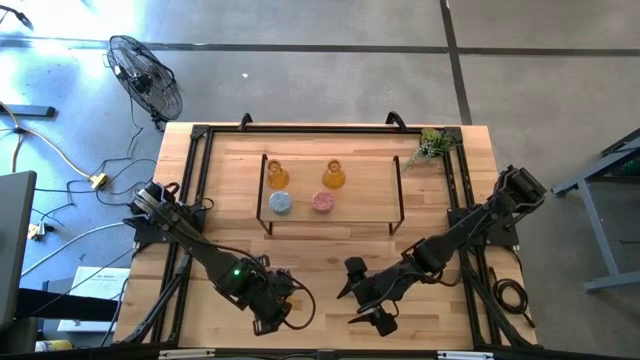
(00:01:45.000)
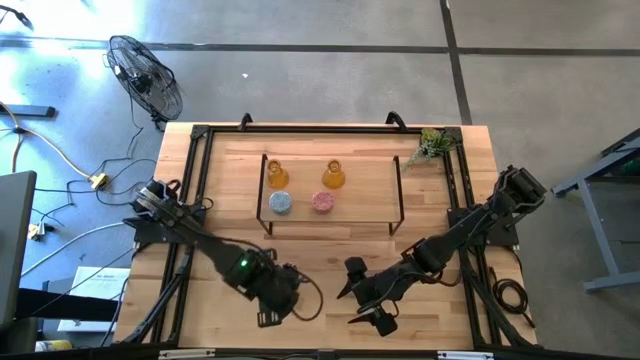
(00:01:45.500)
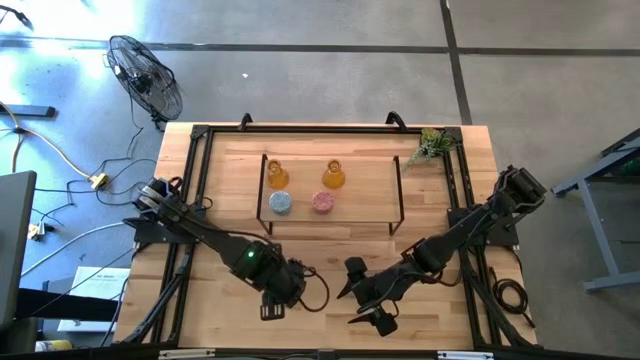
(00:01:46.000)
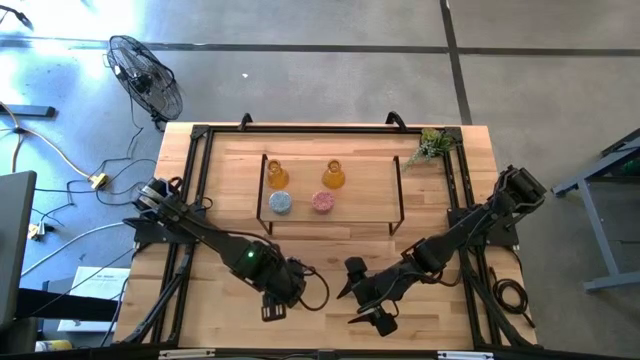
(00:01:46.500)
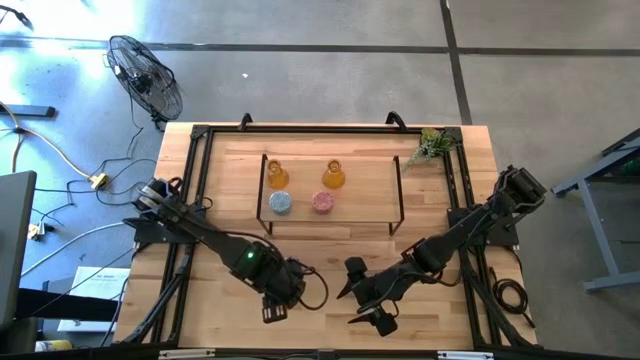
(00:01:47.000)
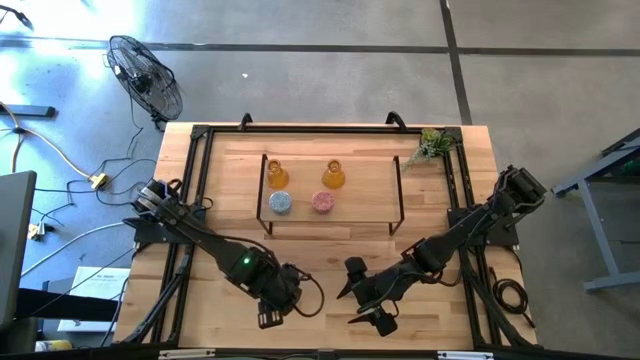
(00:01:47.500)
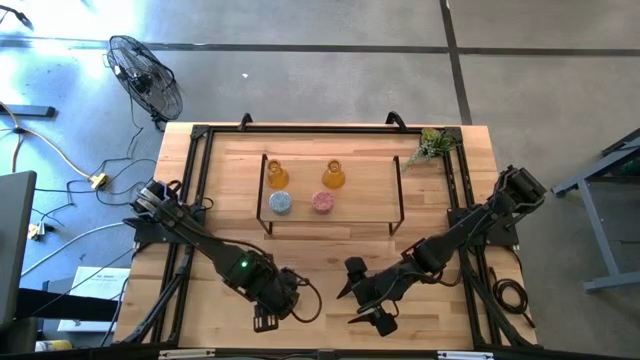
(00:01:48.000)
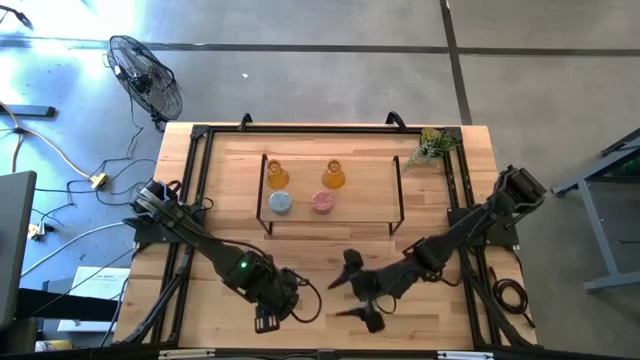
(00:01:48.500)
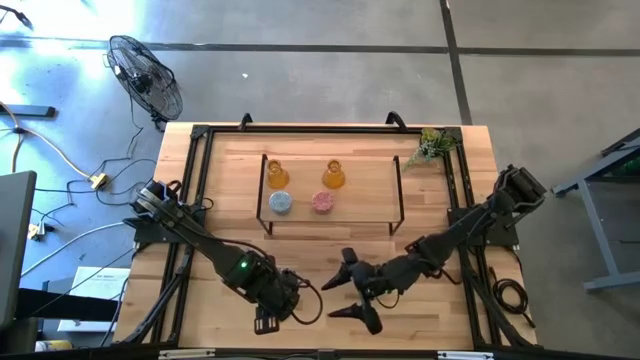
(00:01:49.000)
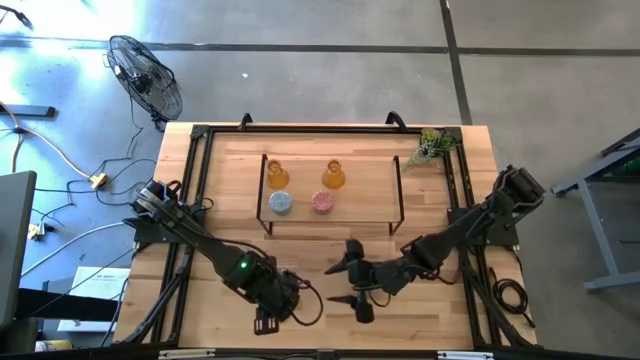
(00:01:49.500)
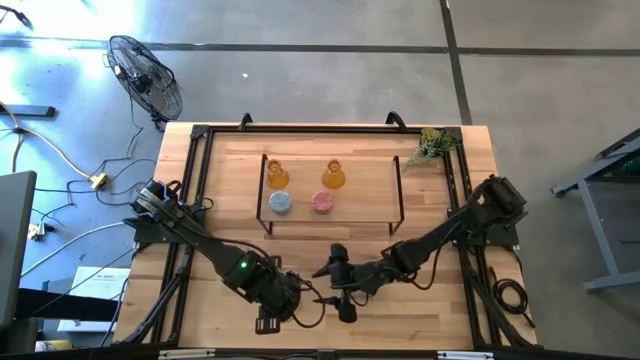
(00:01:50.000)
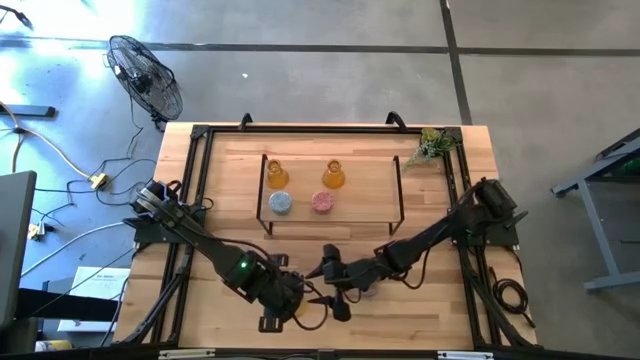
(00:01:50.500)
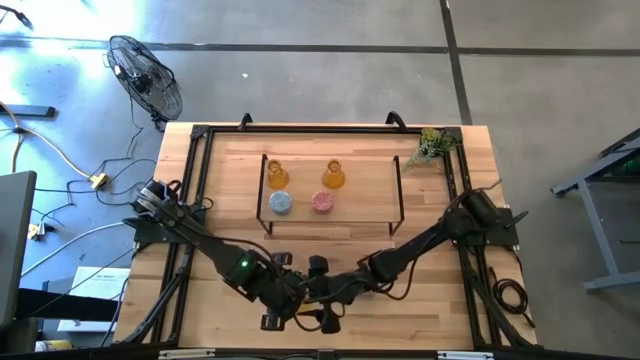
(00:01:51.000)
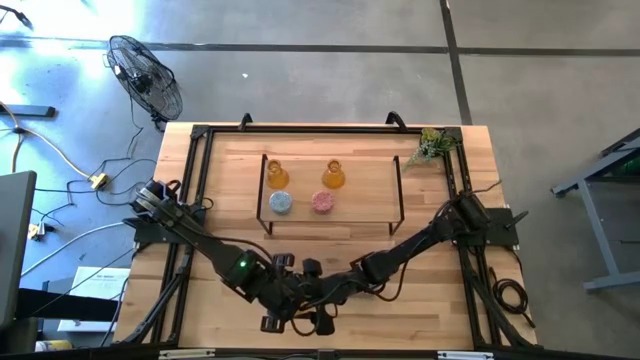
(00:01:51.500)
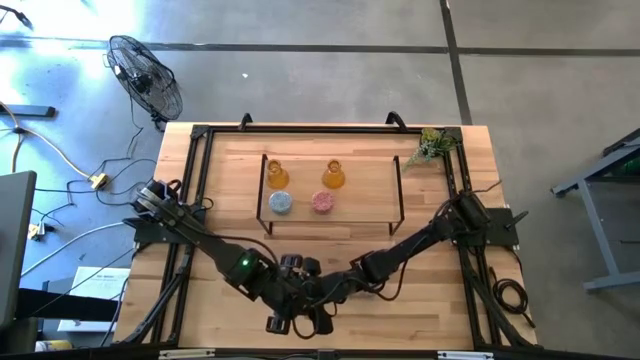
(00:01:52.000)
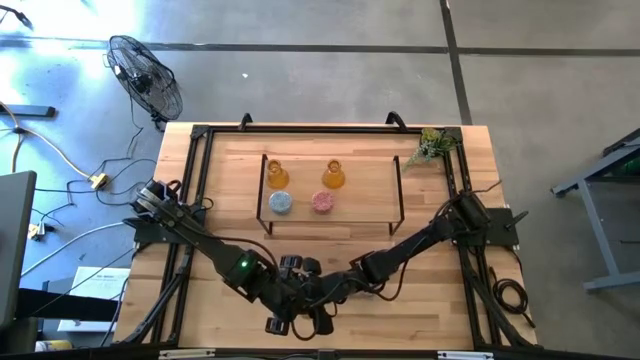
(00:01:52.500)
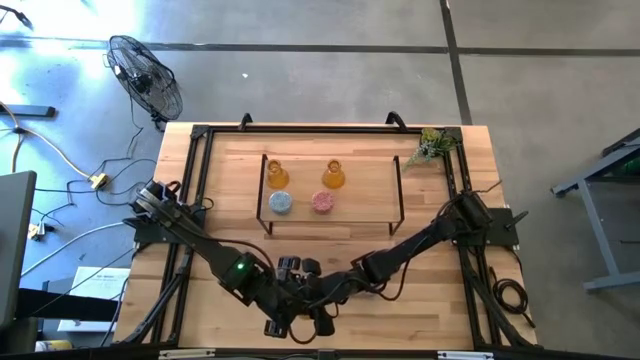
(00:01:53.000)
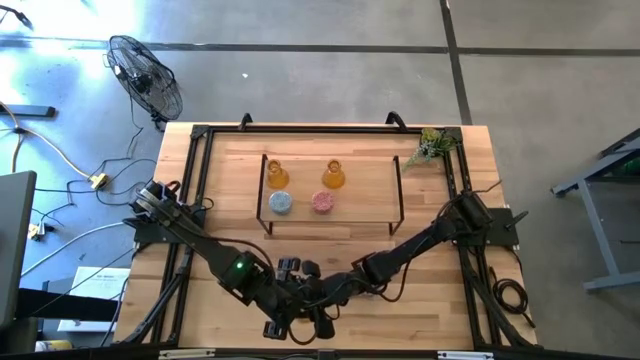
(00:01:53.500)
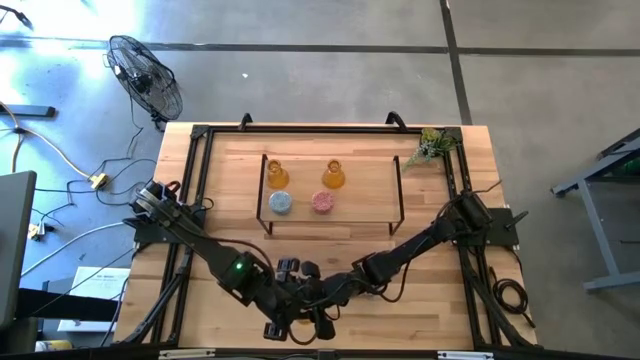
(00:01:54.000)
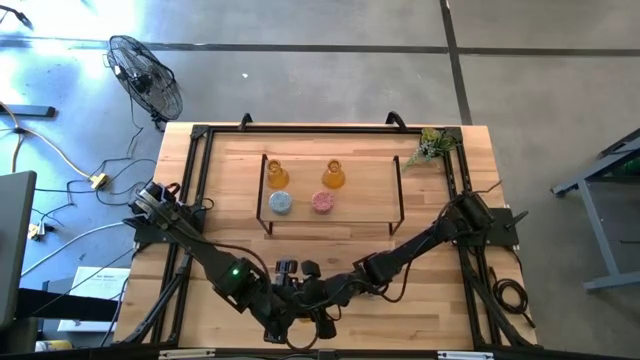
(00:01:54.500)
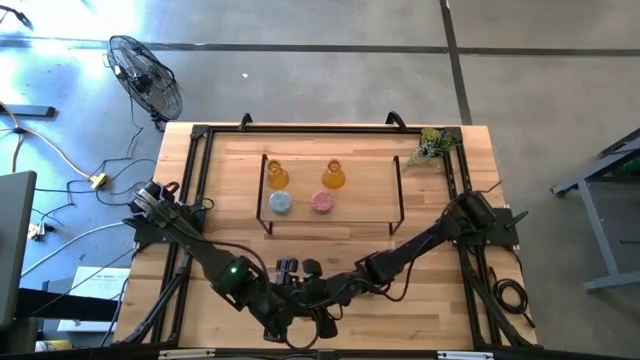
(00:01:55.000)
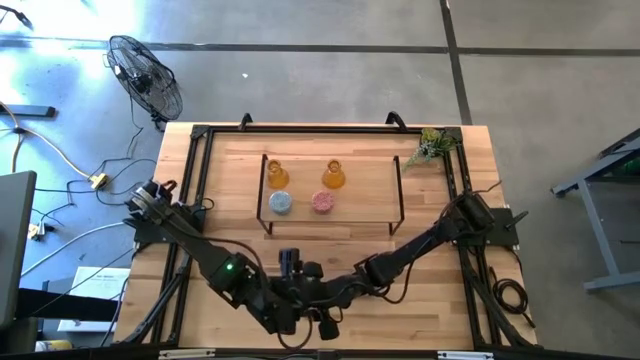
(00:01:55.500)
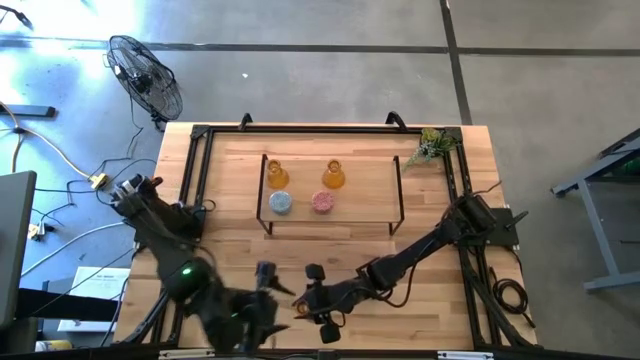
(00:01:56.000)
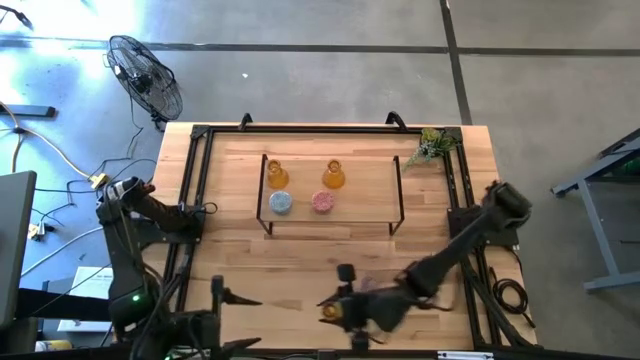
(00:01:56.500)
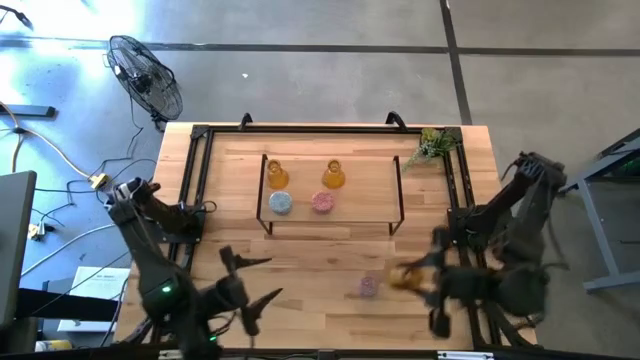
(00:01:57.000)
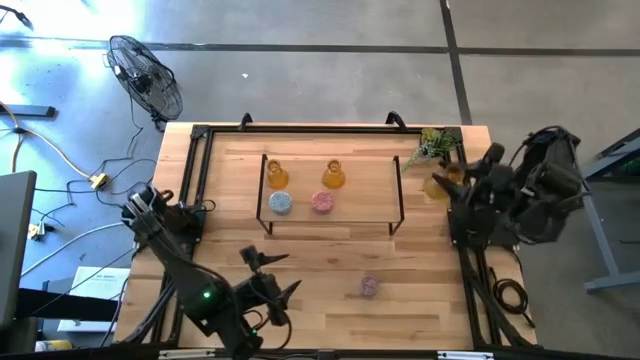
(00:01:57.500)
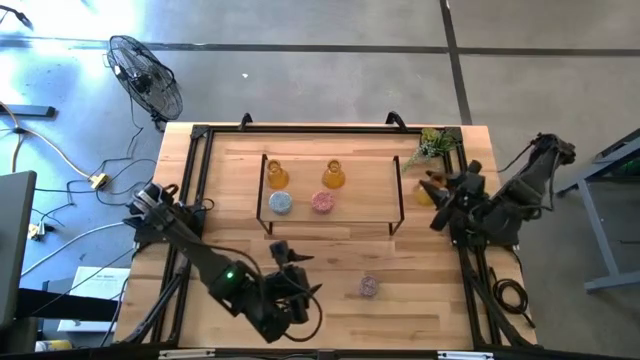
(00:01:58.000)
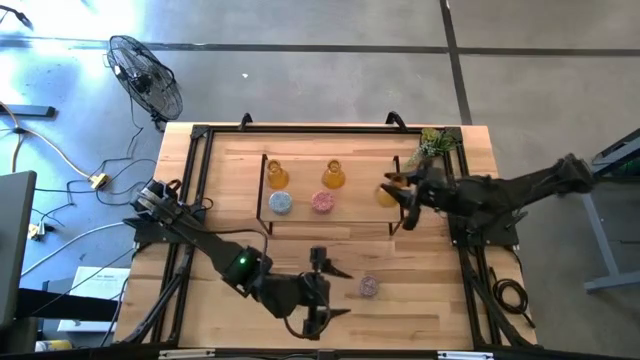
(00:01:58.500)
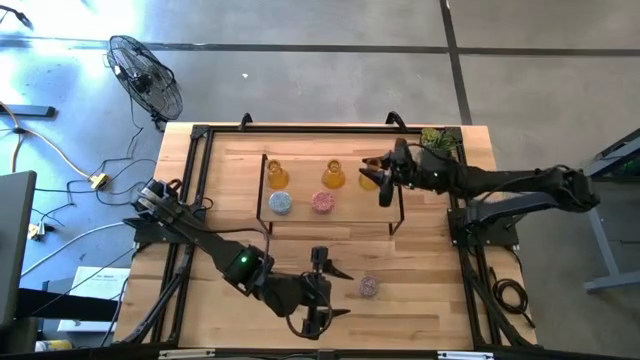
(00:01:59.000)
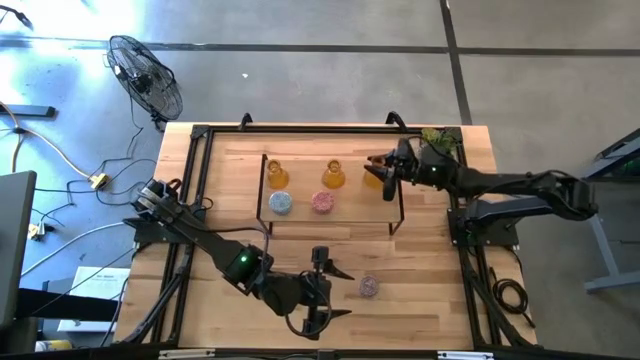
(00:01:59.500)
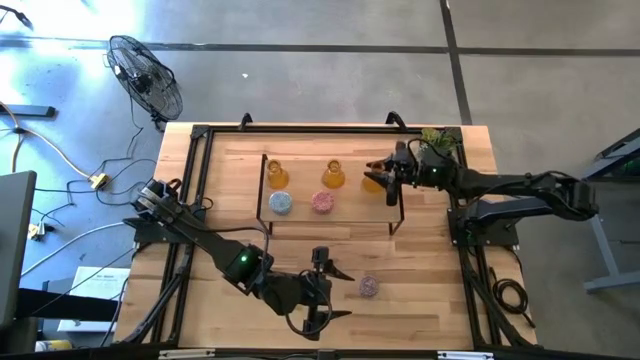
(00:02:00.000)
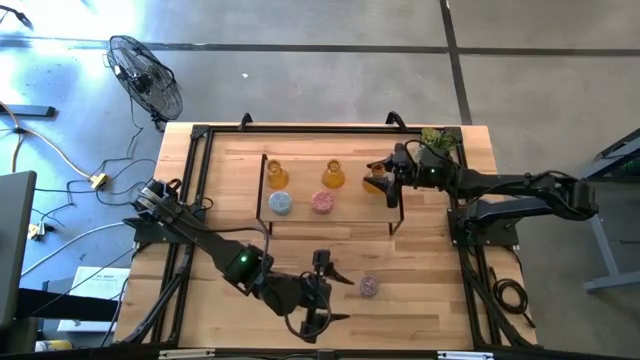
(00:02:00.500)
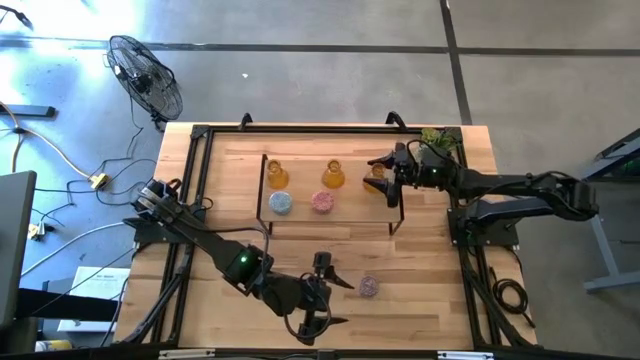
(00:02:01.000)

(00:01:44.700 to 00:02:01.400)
Task: Pick & Place candle stick holders
Put the yellow glass candle holder on the shelf aligned with the other glass candle holder

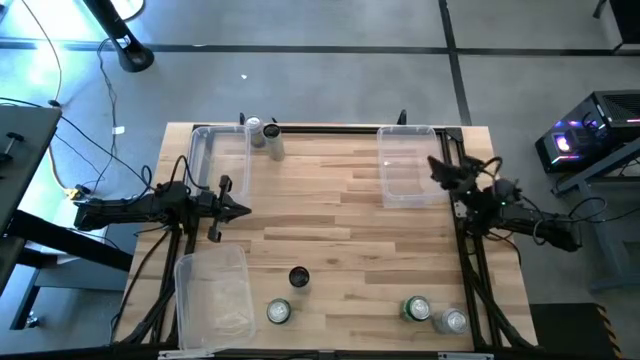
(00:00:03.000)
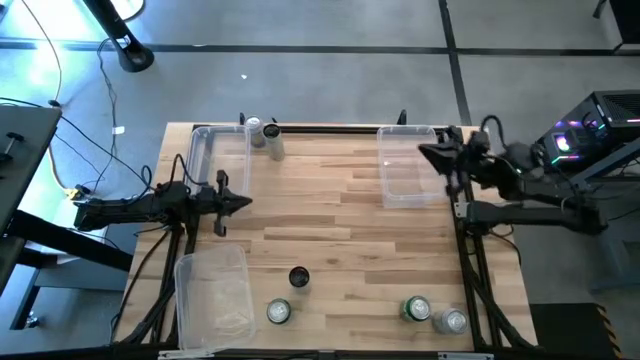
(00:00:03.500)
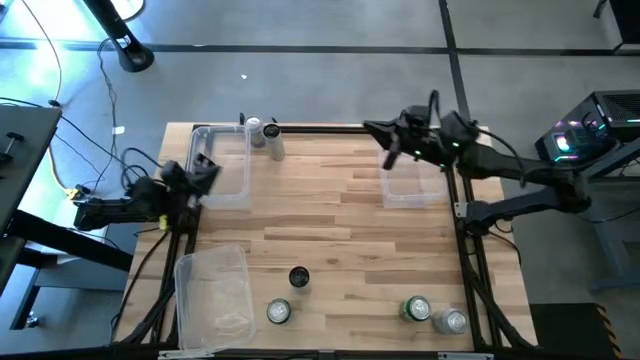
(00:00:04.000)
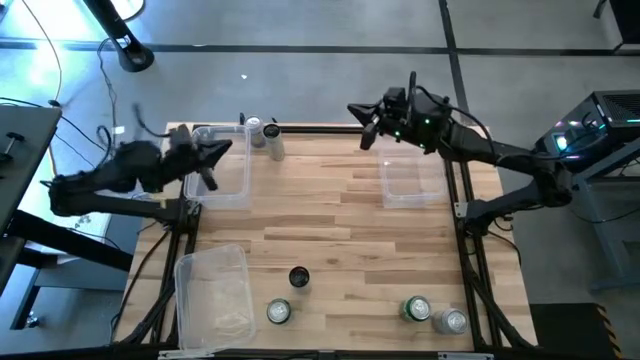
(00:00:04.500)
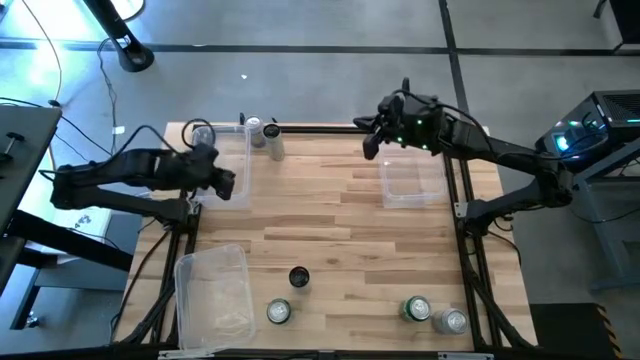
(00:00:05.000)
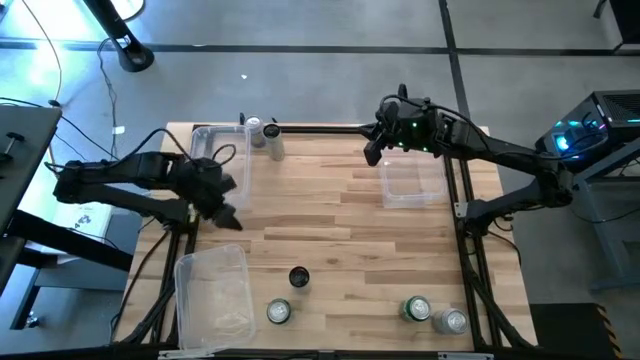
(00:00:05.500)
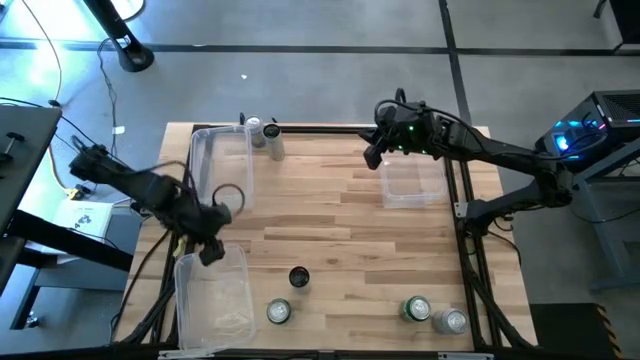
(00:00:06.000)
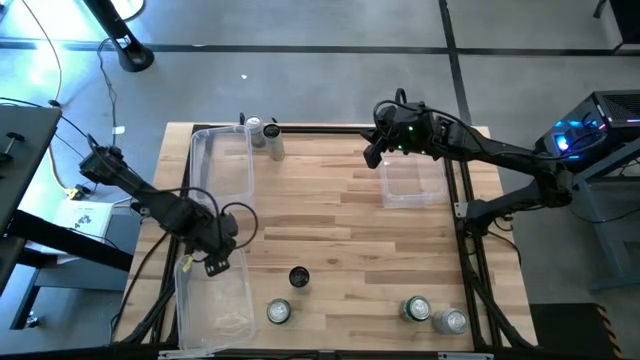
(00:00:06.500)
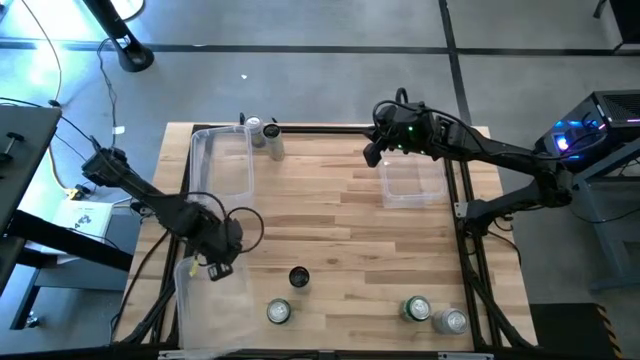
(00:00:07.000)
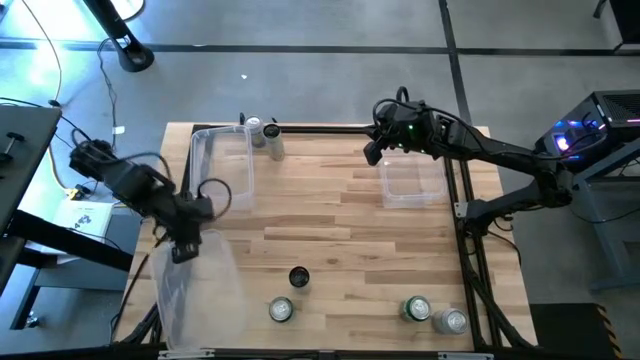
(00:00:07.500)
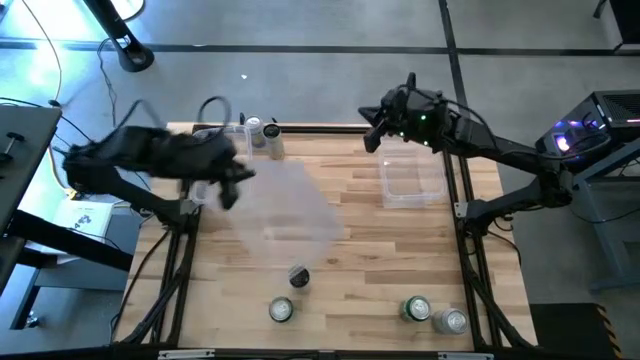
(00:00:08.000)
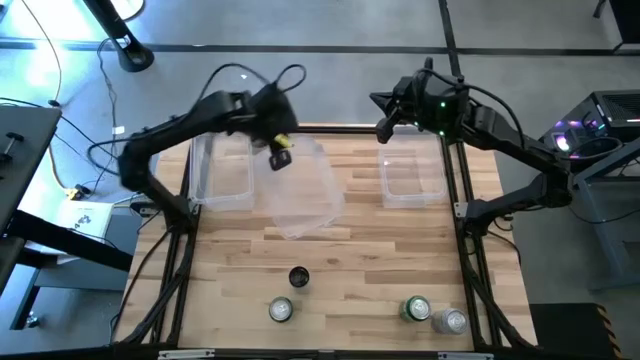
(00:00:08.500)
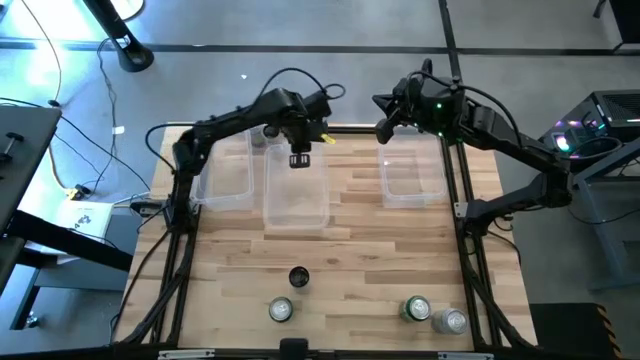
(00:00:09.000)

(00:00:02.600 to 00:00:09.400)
Task: Sort soda cans
Move the bottom left transparent bin to the top center of the table
